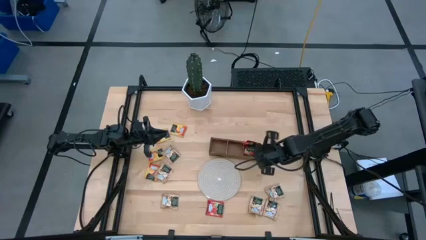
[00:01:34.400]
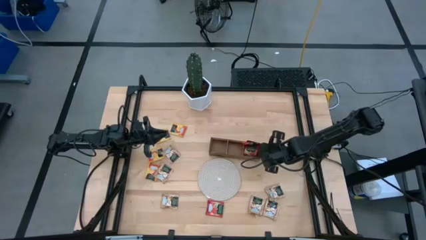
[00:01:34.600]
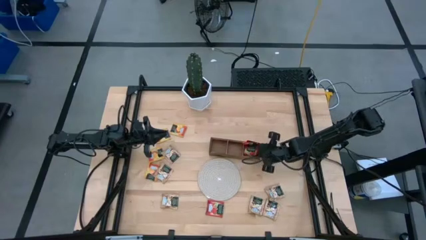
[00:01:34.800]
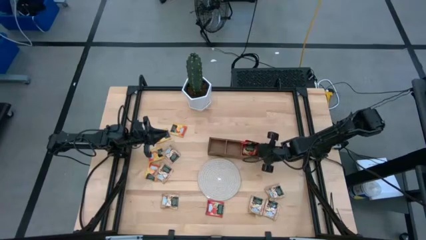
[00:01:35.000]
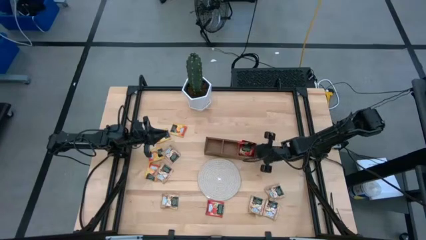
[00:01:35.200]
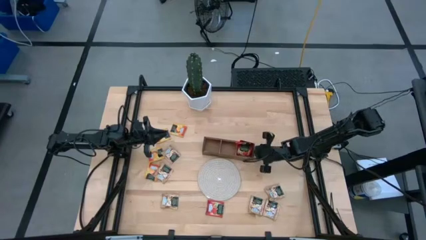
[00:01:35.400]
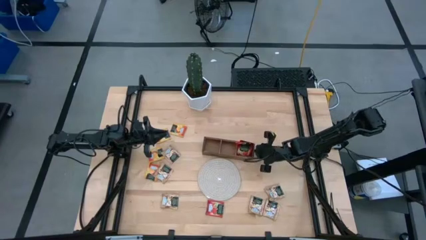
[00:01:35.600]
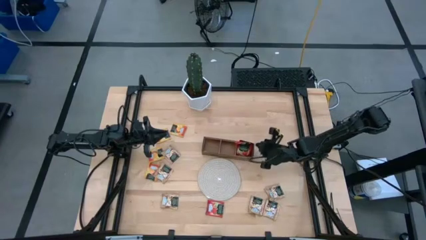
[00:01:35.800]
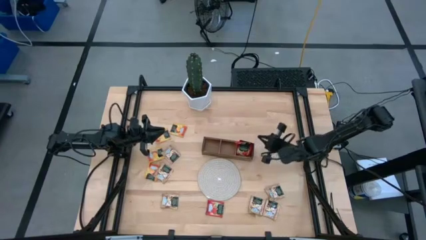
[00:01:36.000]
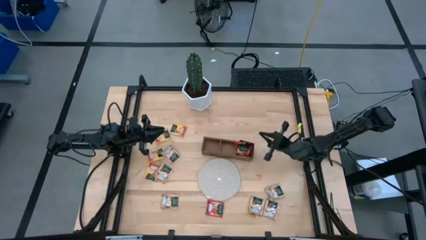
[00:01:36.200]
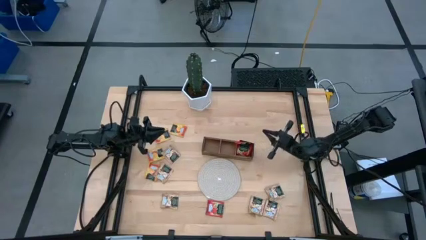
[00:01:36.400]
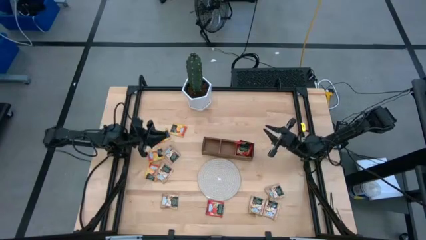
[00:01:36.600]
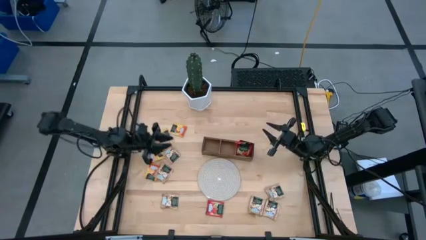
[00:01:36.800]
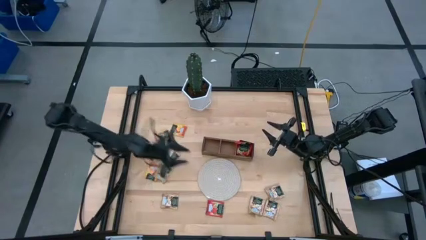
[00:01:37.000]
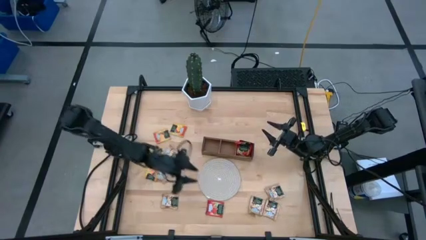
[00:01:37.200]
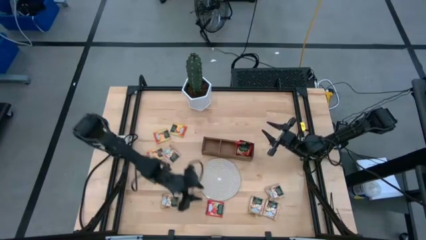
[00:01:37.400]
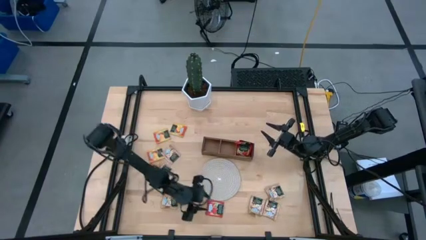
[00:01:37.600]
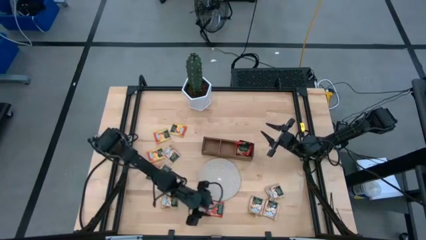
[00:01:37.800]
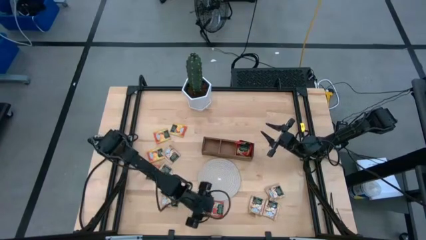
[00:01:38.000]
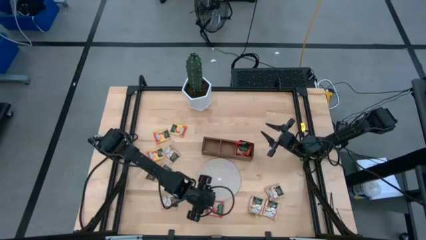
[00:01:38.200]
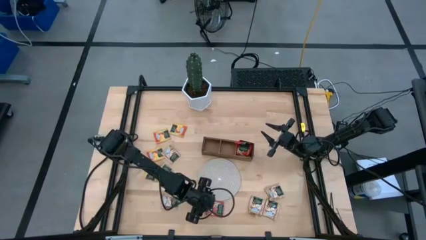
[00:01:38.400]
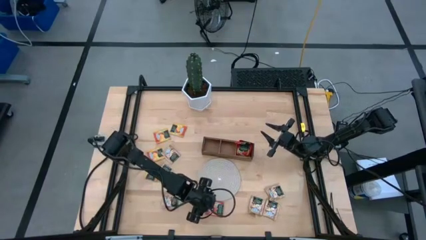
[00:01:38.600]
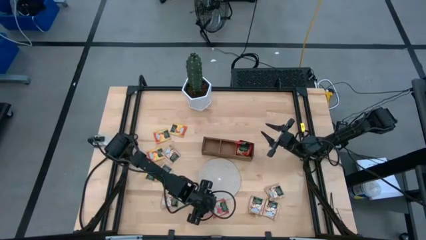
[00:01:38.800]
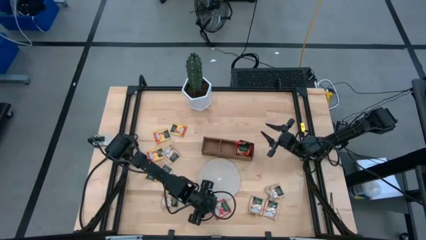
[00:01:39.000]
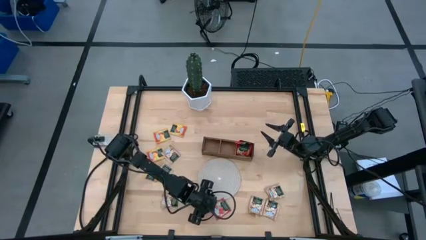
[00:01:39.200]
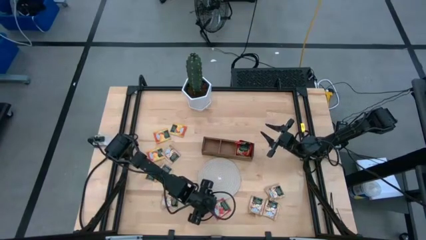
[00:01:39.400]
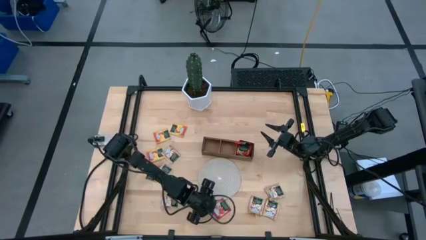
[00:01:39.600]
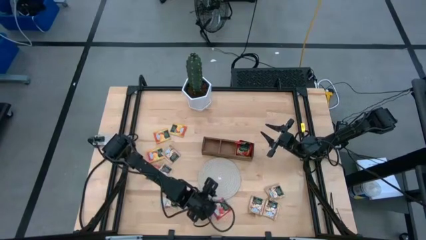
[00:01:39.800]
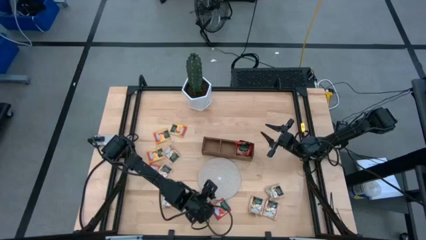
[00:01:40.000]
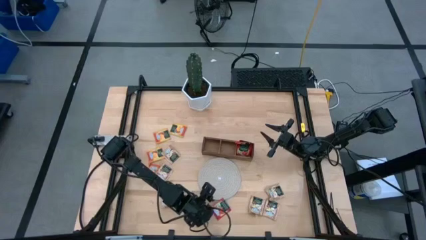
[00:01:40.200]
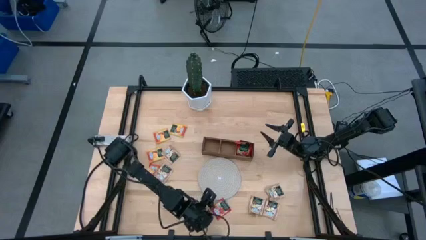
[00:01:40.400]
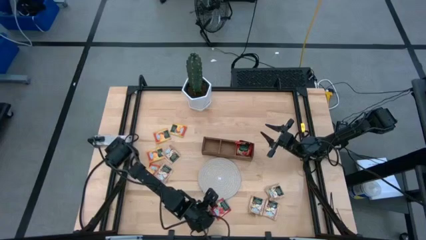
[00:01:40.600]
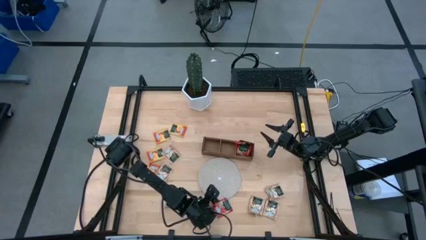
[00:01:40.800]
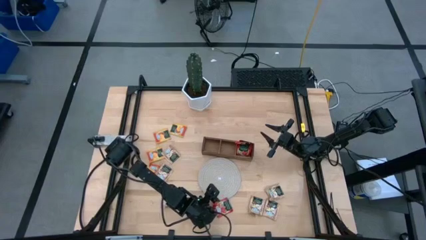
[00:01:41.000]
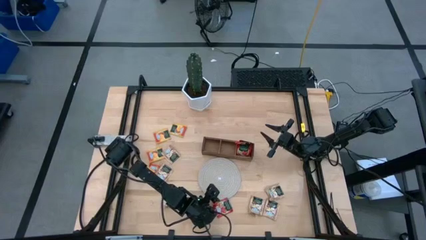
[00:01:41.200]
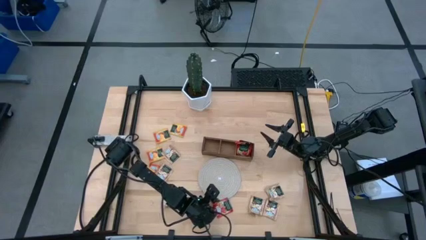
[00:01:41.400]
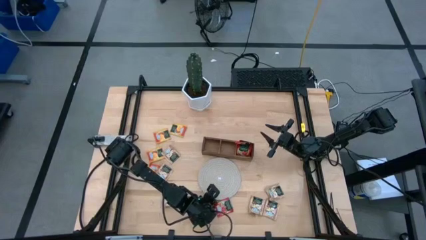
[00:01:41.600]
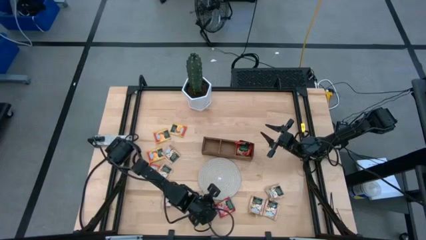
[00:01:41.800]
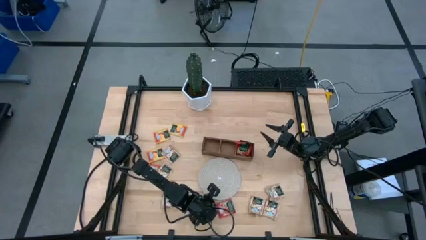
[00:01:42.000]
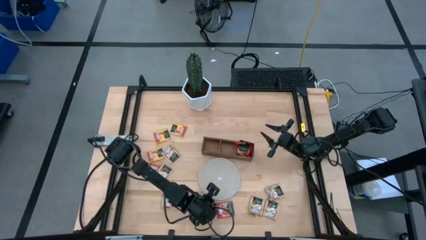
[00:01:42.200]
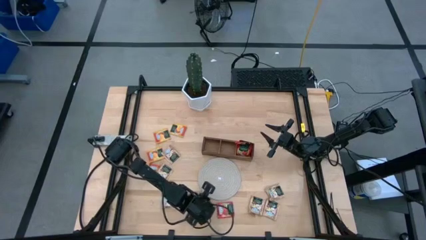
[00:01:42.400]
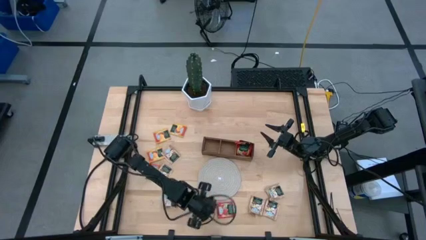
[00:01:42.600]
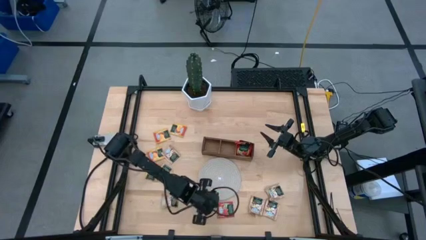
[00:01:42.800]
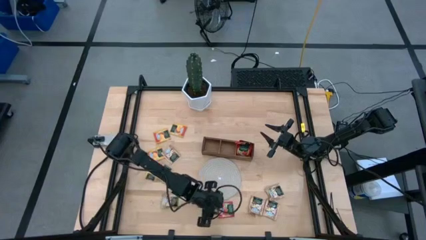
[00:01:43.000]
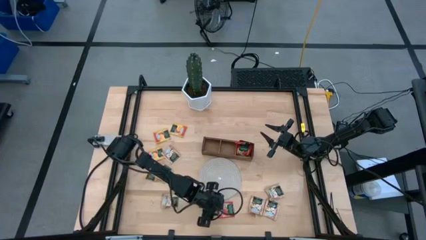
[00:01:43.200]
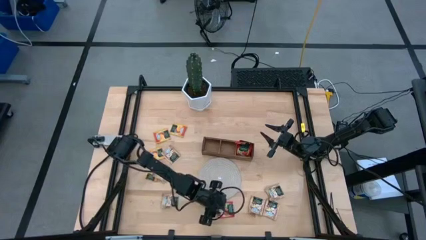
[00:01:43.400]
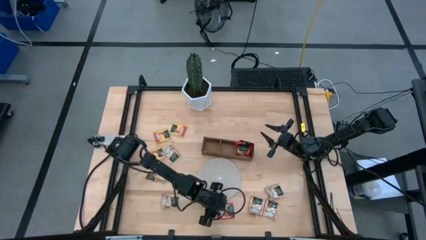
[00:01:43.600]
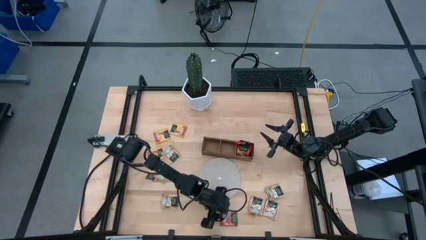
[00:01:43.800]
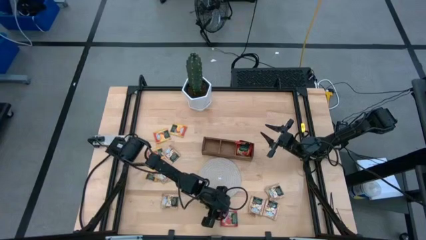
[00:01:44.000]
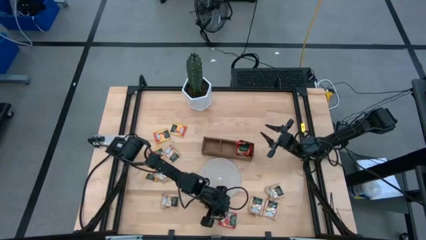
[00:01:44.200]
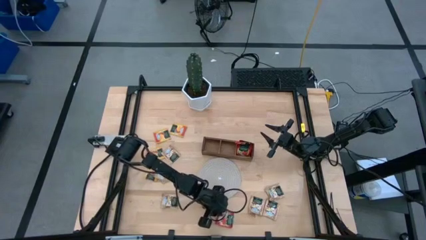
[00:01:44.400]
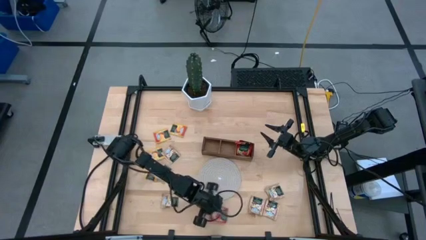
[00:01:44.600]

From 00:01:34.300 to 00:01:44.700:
Task: Pick & Place Tea
Put the red tea bag into the right section of the wooden organizer

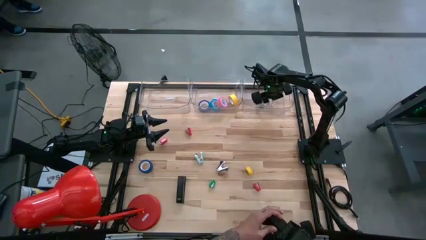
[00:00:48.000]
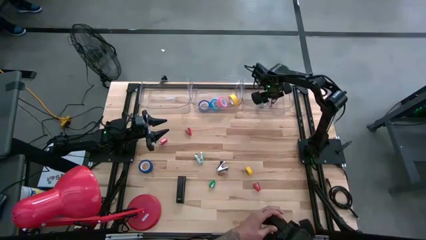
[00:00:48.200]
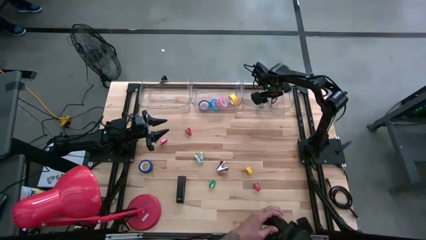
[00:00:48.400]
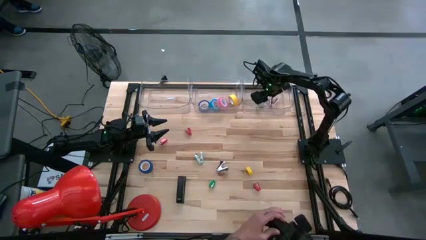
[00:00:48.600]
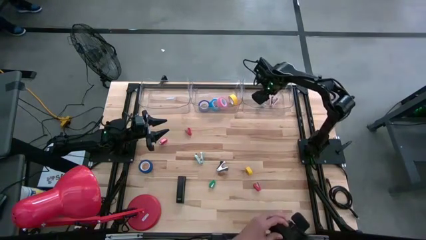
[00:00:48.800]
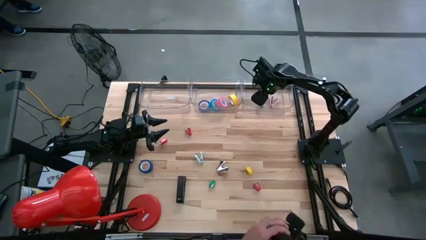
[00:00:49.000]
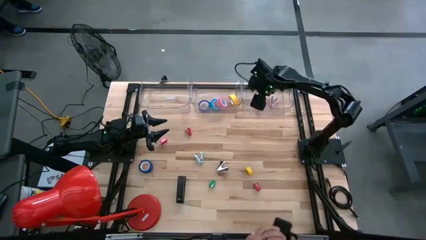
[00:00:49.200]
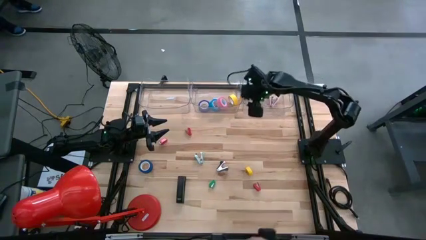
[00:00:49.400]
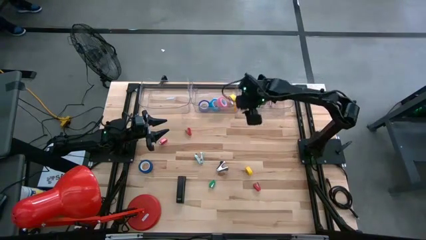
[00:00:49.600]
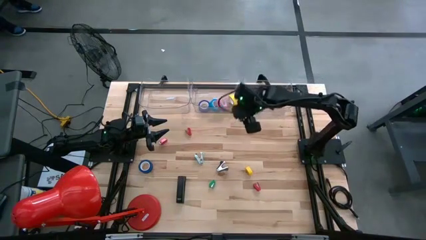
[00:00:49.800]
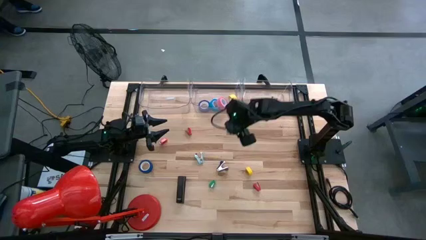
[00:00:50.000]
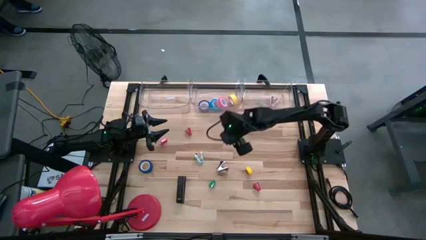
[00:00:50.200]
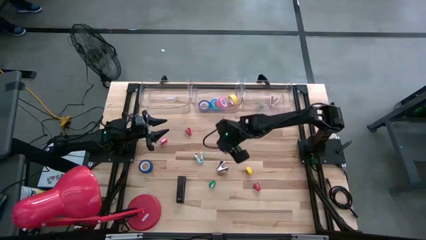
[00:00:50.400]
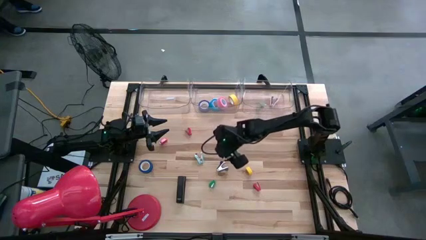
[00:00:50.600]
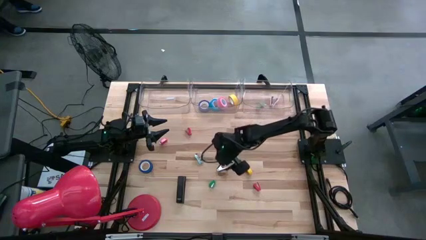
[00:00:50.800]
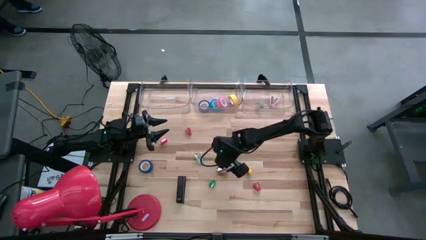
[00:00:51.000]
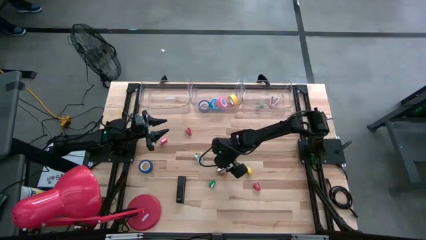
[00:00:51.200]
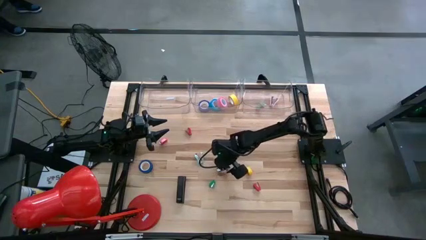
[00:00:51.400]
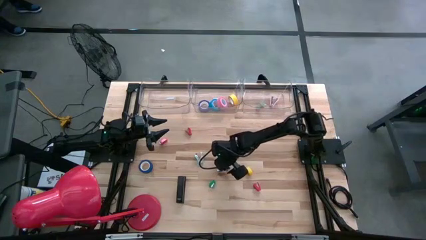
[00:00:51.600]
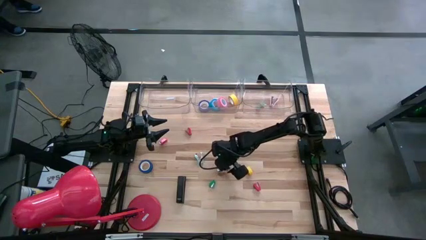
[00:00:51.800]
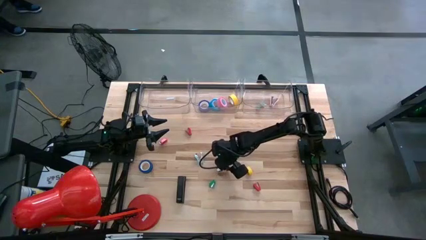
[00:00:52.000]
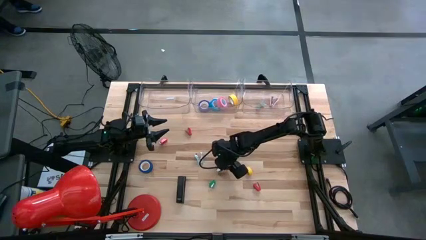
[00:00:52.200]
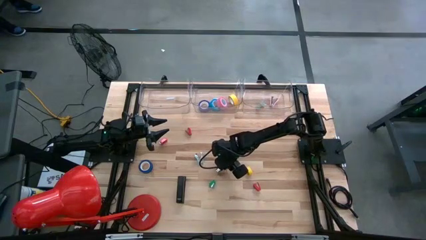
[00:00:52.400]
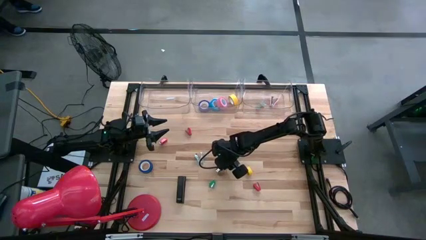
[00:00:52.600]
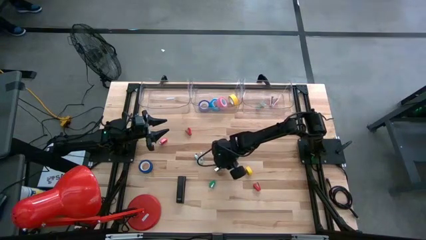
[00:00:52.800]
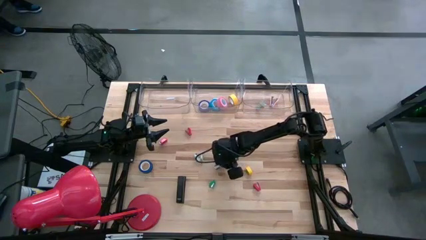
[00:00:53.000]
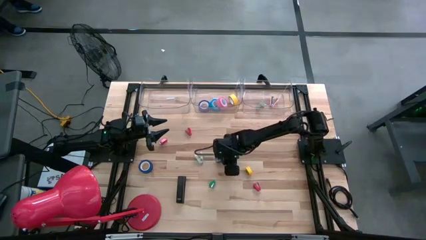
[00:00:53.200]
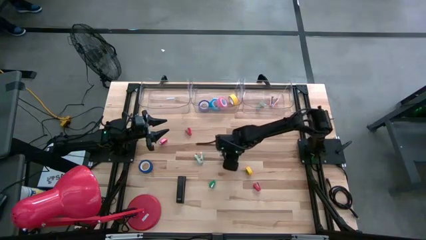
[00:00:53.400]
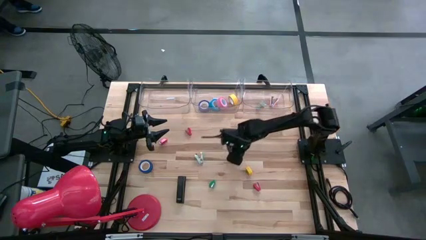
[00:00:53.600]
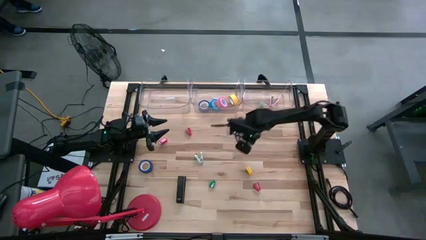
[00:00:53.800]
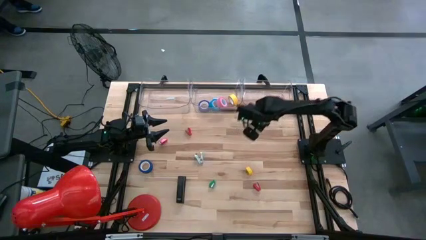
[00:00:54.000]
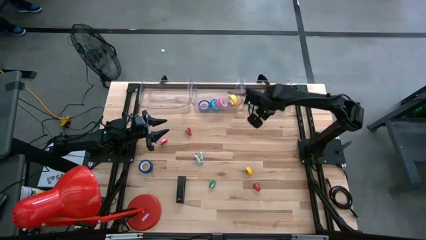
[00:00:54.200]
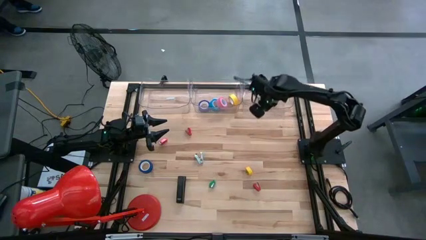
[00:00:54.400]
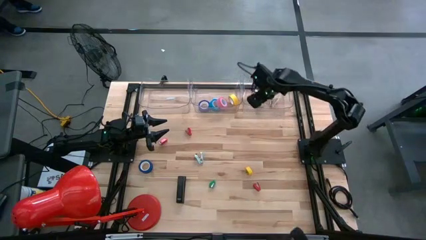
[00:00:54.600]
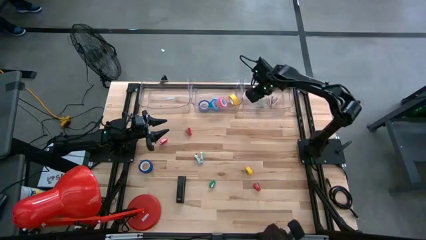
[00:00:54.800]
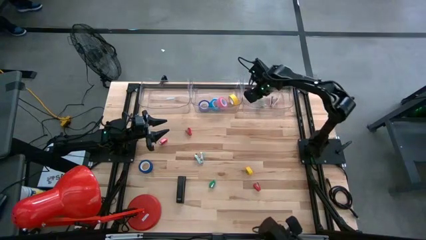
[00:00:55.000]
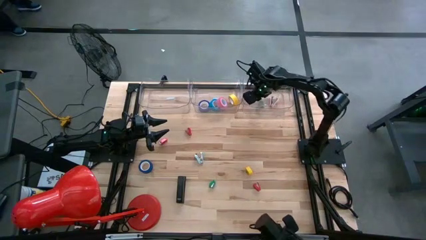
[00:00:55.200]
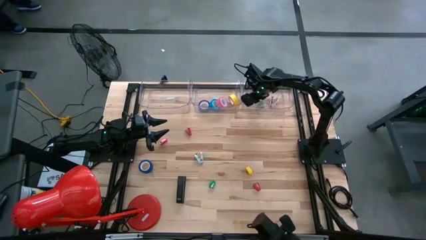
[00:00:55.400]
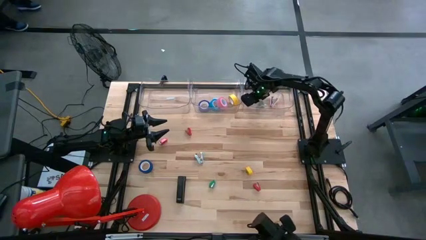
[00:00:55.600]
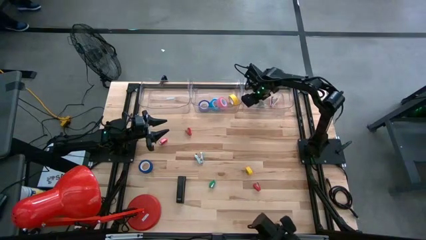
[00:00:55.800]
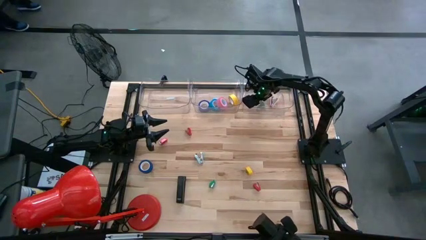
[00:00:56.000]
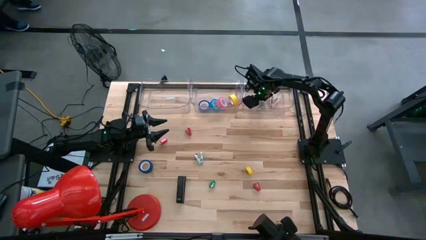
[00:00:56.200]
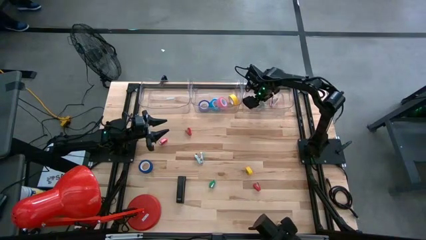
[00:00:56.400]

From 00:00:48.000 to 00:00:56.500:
Task: Pick and place Stapler, Stapler remover, tape
Put the black staple remover into the right transparent bin
